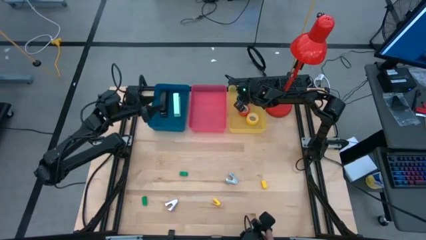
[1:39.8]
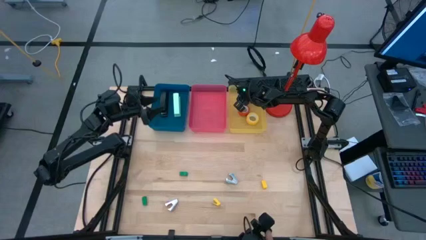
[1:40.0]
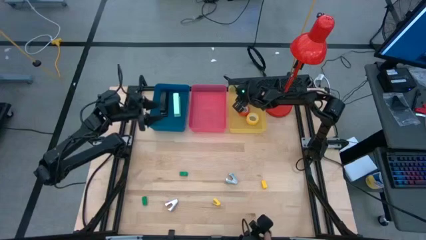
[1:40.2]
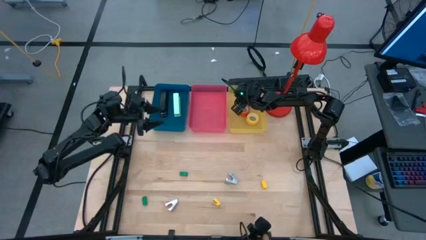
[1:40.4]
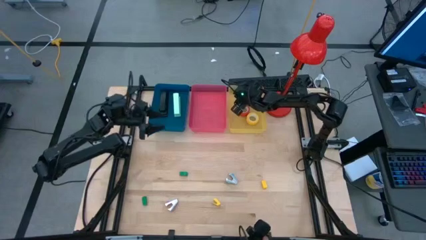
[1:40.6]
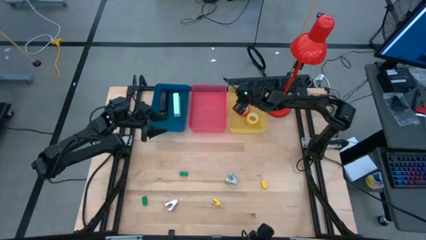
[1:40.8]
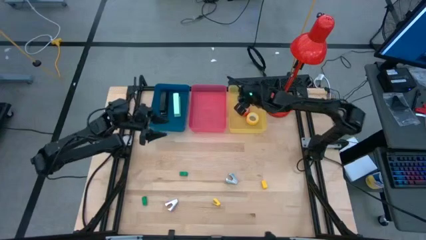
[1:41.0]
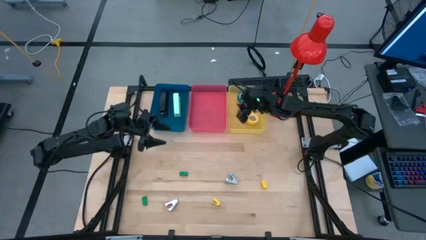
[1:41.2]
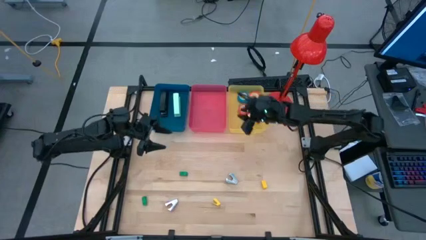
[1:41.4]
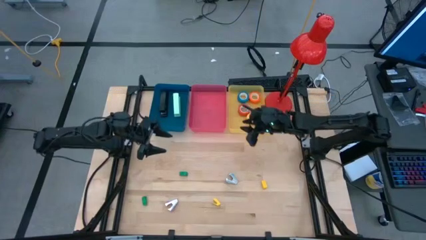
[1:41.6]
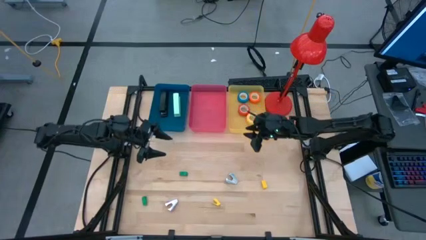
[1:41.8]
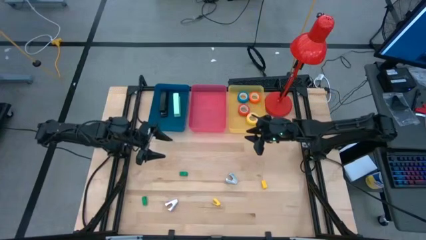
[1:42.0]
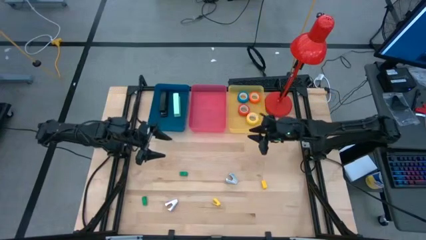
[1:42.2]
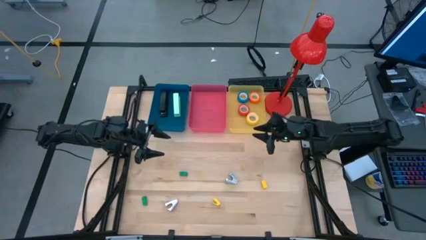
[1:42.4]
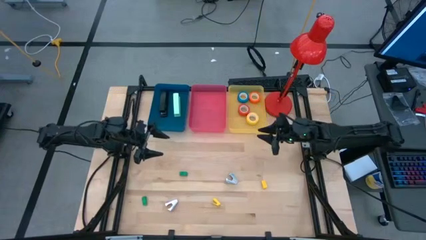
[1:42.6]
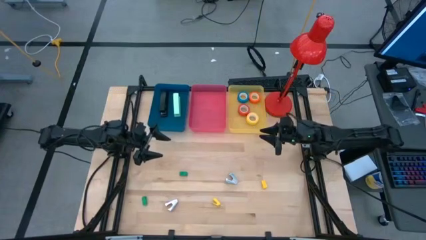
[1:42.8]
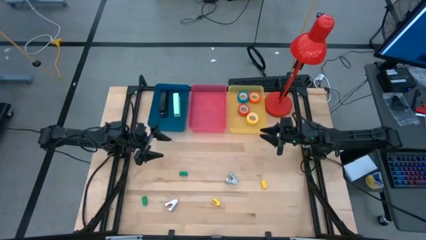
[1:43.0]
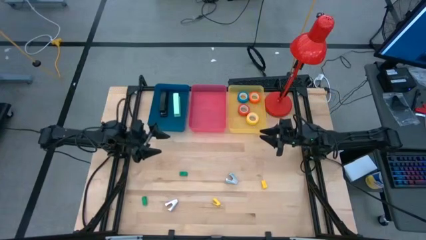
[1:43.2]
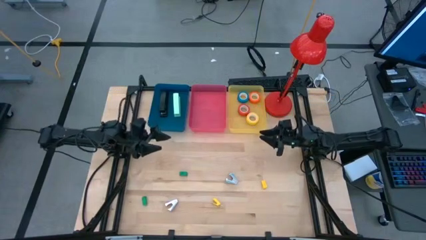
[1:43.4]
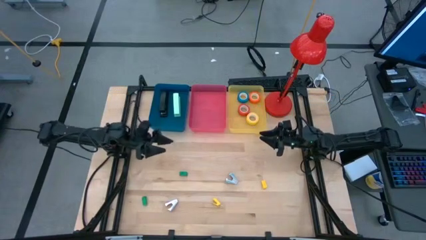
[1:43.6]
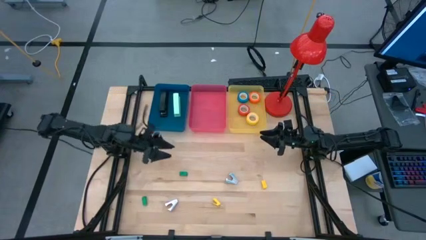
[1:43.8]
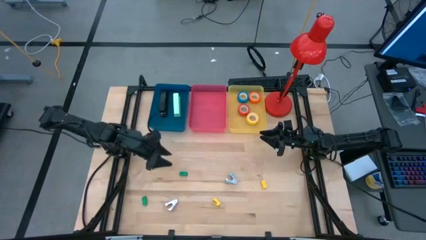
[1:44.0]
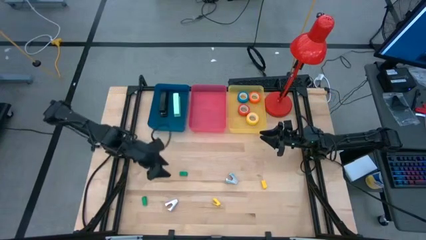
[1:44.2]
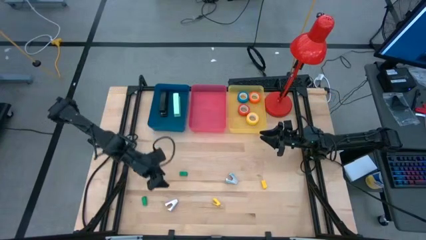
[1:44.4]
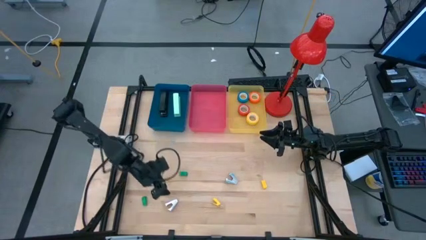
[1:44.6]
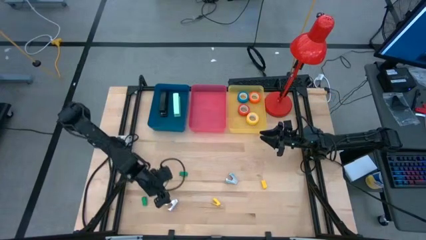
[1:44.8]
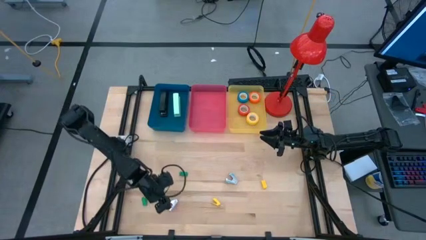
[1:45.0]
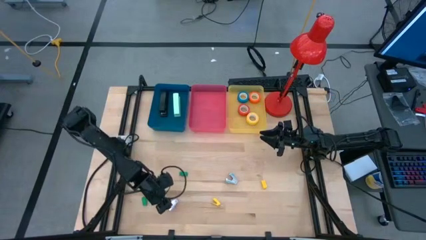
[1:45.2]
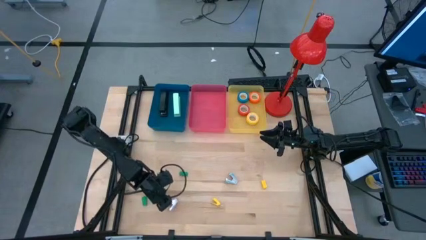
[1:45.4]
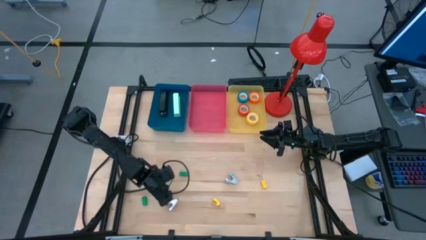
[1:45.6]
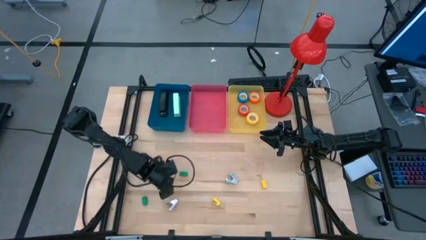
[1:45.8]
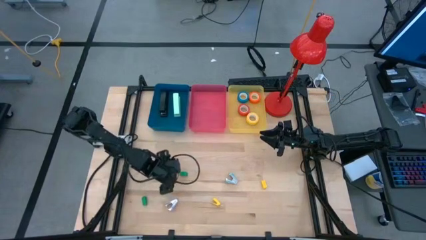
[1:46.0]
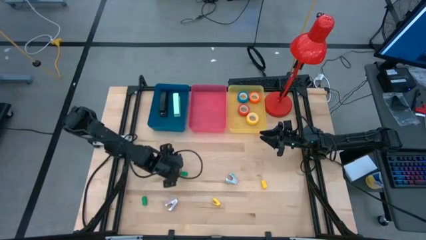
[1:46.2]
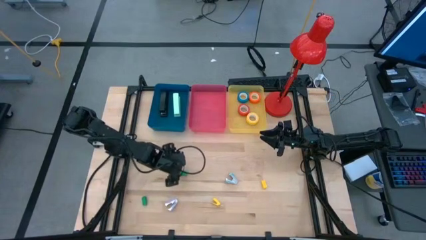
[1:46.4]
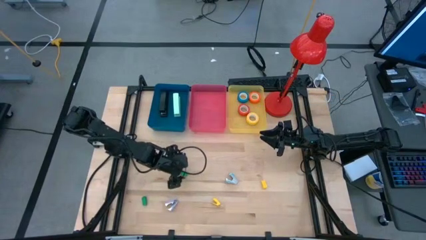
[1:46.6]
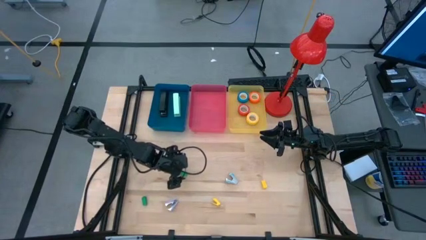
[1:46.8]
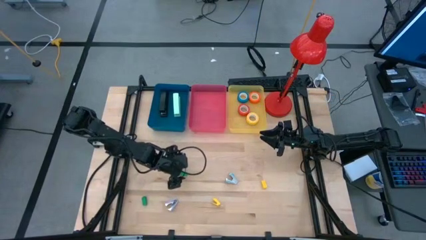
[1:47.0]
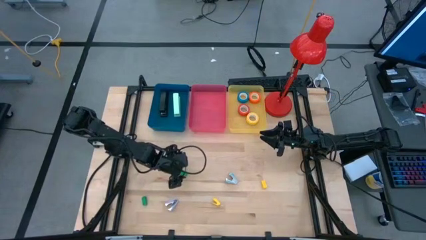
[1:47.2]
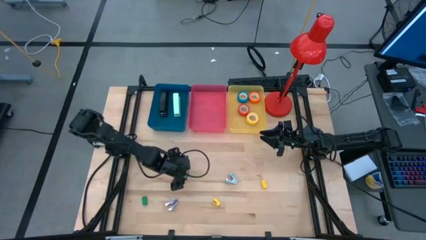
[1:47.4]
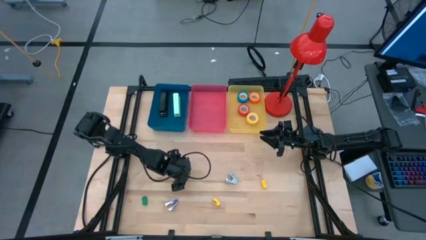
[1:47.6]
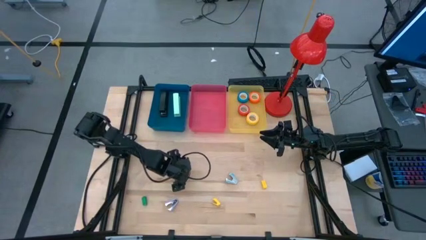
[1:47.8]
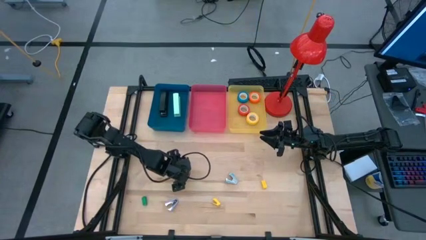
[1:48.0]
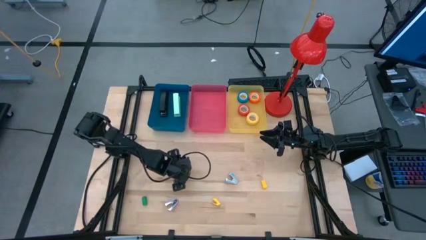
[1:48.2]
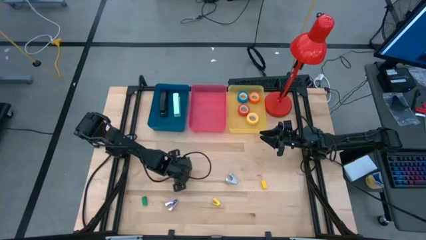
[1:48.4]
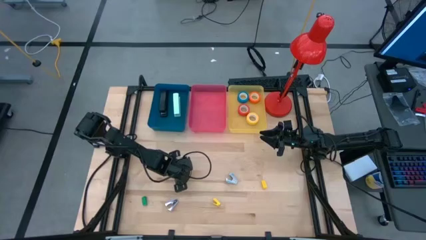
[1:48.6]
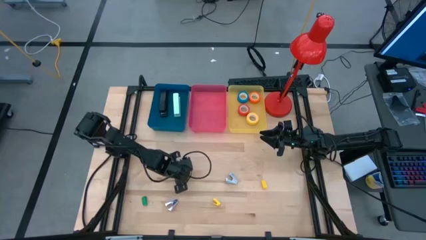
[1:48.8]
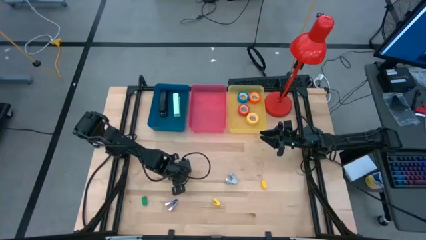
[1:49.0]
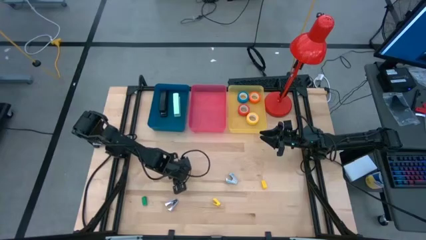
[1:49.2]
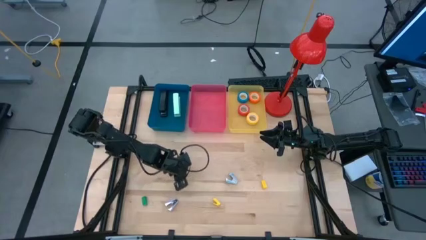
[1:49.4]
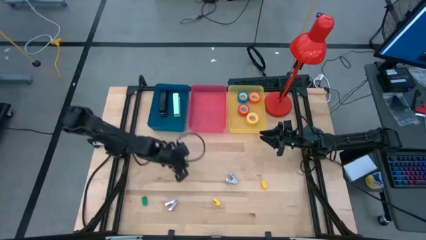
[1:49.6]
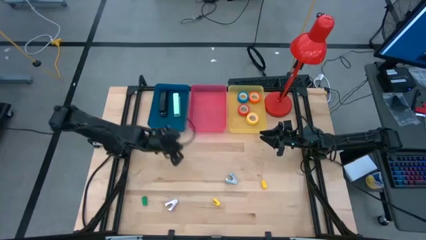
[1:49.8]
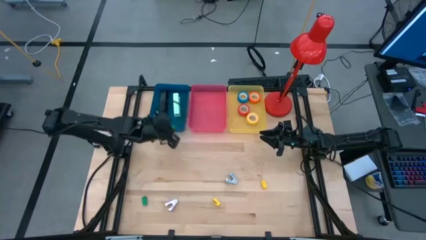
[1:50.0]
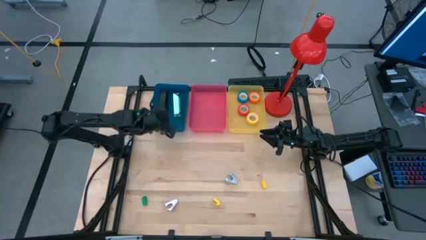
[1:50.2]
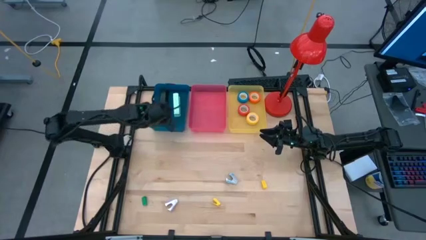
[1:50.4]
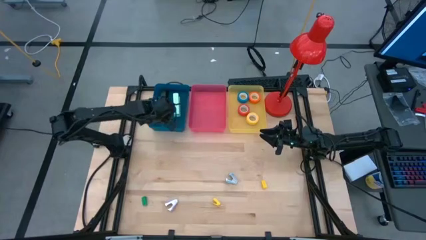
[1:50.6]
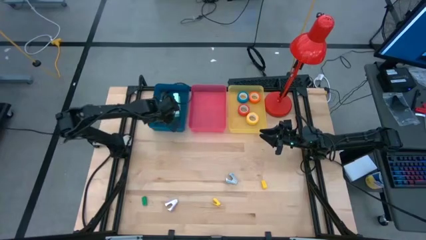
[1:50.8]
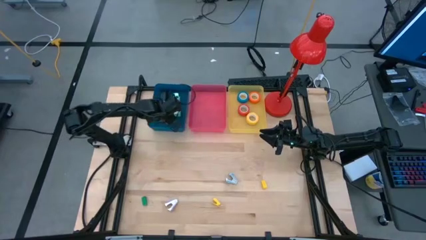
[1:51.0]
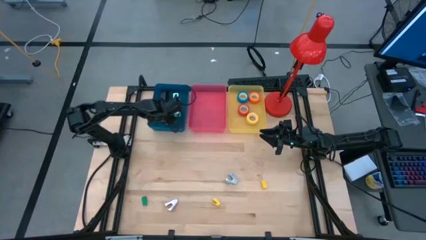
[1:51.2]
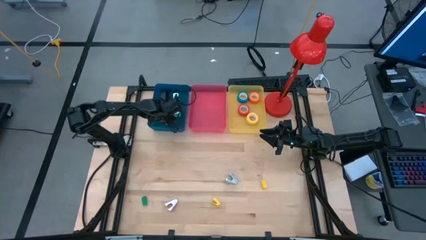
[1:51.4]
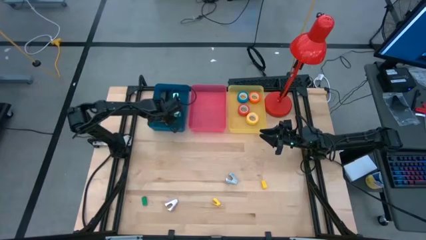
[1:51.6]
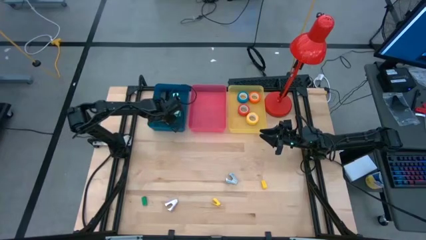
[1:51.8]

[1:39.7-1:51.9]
Task: Pick and place Stapler, Stapler remover, tape
Put the top green stapler into the blue bin
